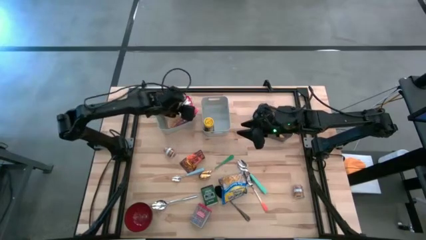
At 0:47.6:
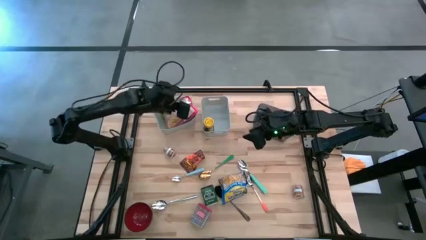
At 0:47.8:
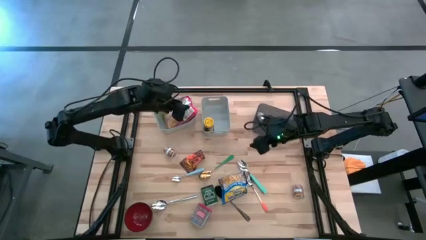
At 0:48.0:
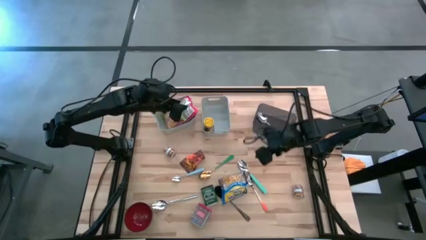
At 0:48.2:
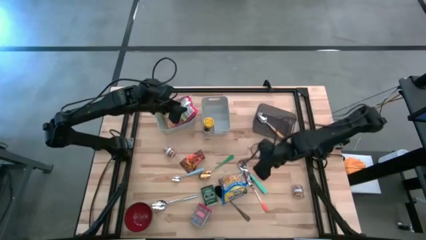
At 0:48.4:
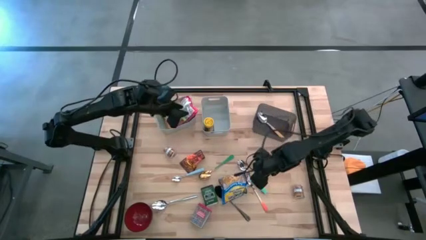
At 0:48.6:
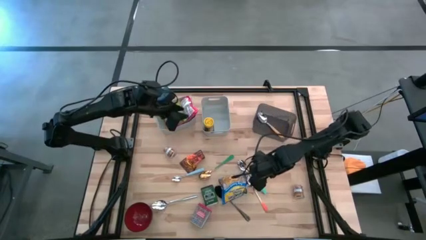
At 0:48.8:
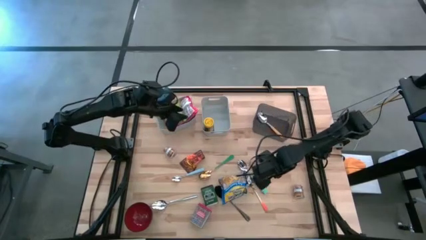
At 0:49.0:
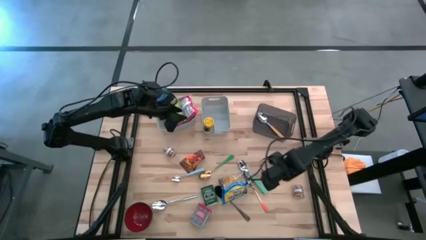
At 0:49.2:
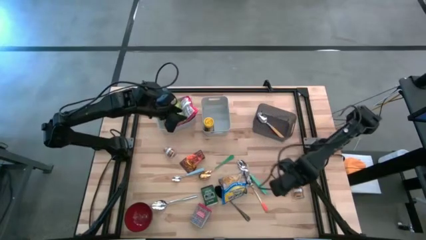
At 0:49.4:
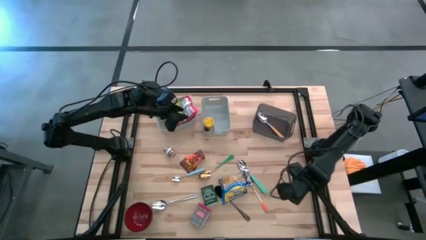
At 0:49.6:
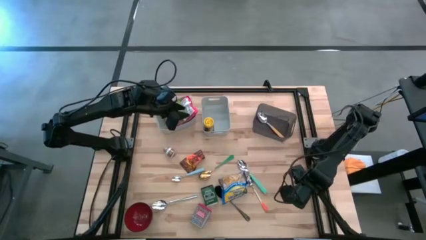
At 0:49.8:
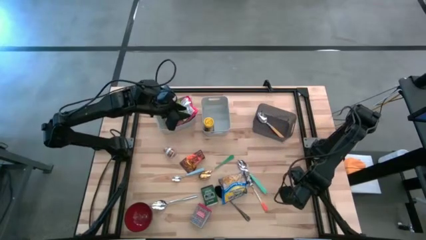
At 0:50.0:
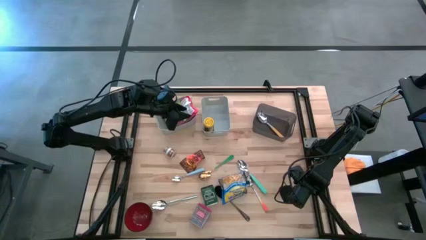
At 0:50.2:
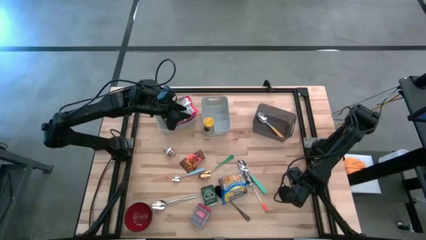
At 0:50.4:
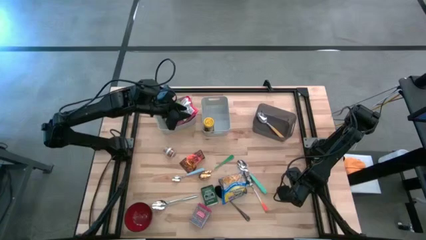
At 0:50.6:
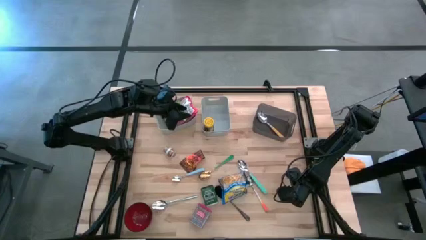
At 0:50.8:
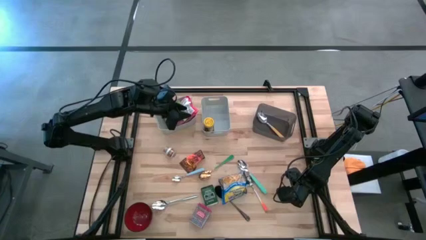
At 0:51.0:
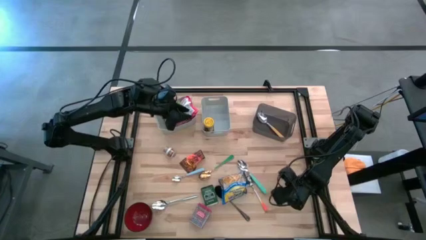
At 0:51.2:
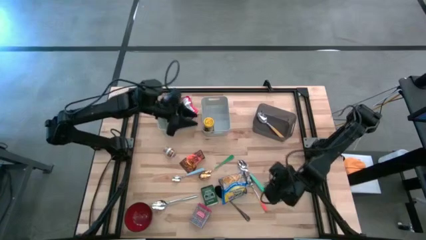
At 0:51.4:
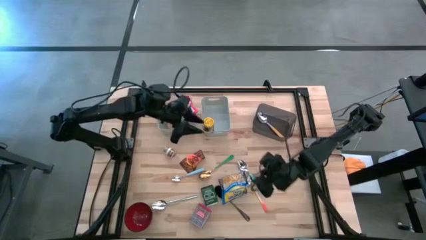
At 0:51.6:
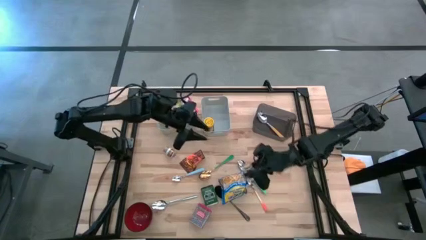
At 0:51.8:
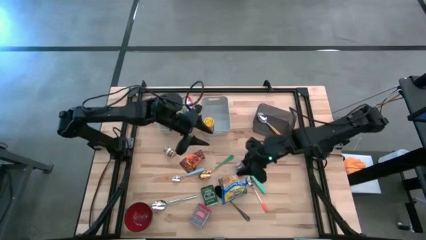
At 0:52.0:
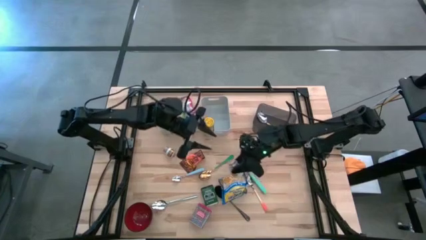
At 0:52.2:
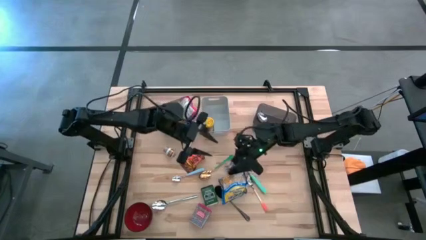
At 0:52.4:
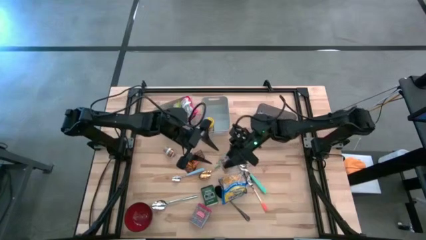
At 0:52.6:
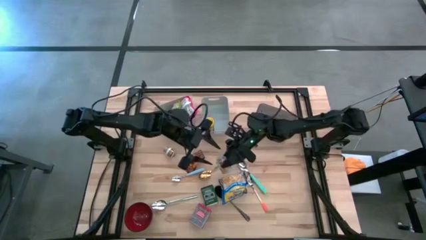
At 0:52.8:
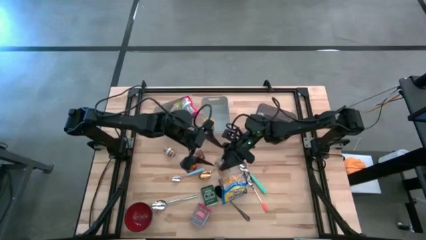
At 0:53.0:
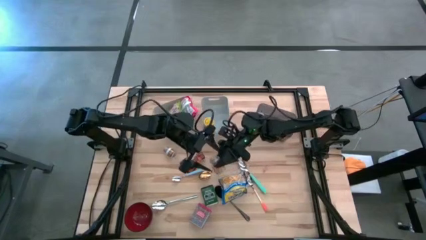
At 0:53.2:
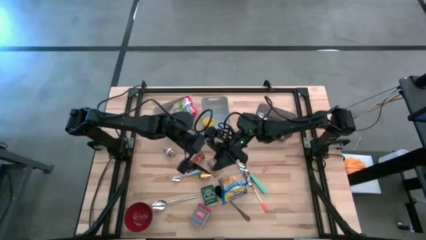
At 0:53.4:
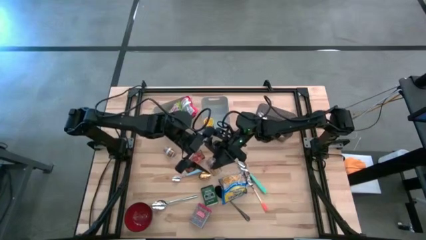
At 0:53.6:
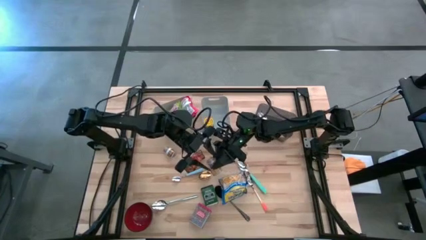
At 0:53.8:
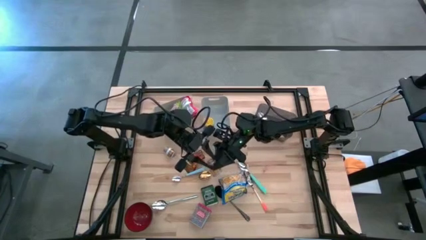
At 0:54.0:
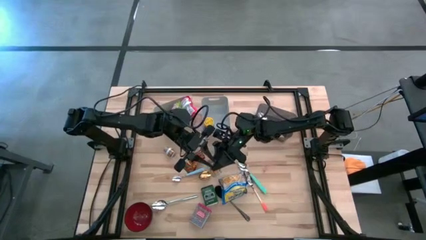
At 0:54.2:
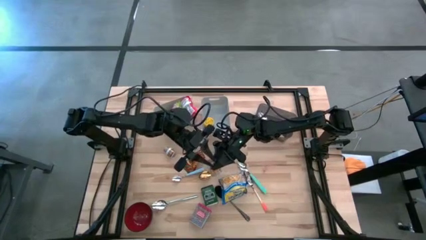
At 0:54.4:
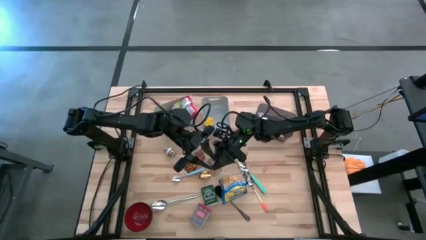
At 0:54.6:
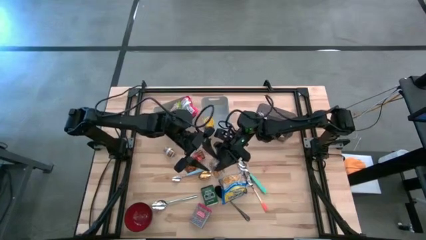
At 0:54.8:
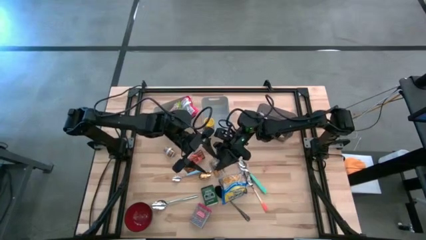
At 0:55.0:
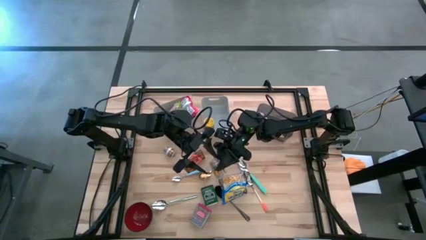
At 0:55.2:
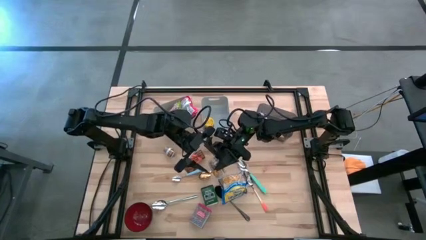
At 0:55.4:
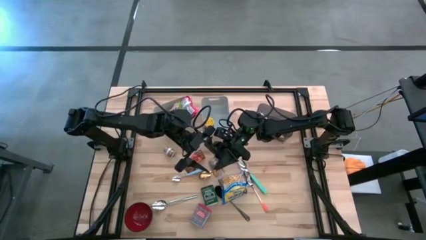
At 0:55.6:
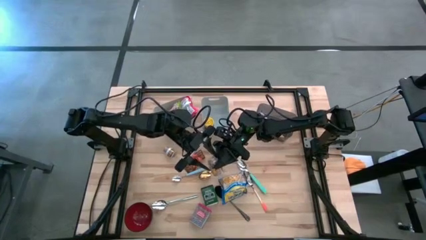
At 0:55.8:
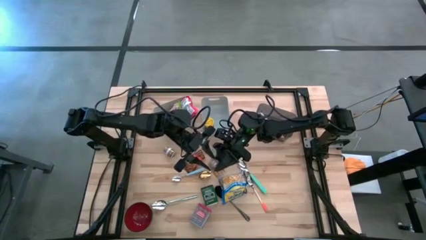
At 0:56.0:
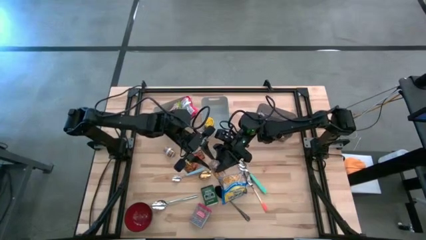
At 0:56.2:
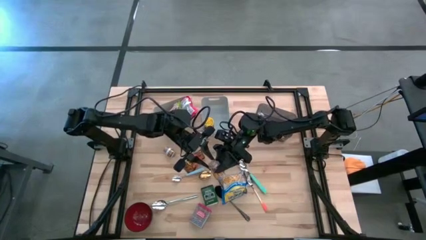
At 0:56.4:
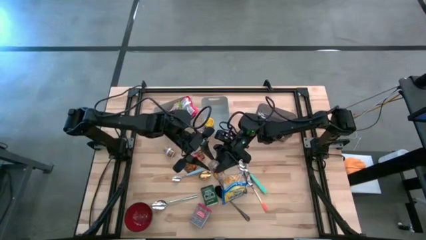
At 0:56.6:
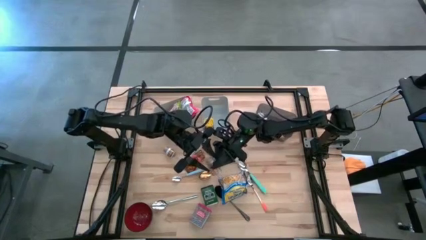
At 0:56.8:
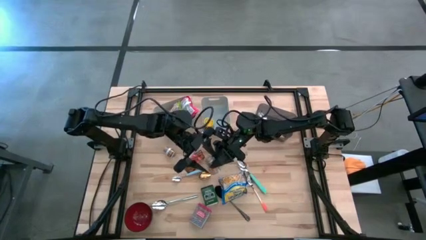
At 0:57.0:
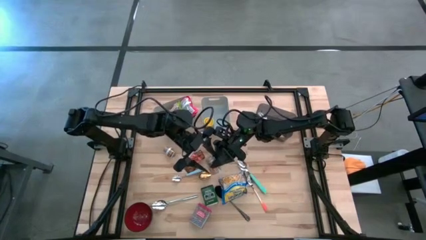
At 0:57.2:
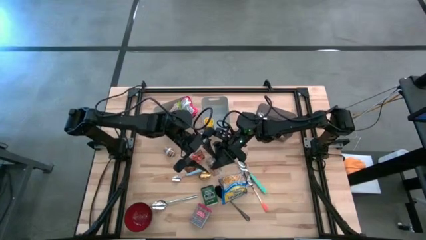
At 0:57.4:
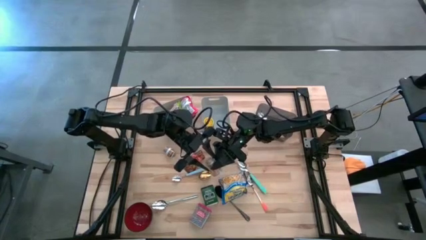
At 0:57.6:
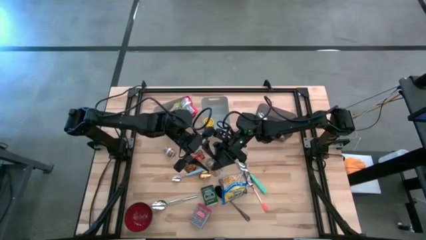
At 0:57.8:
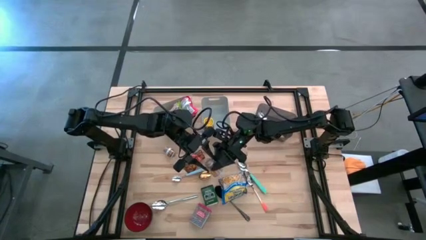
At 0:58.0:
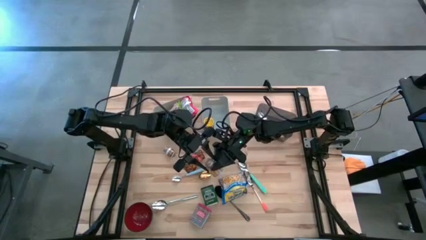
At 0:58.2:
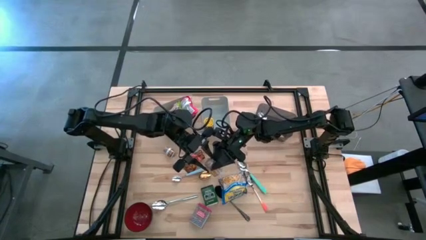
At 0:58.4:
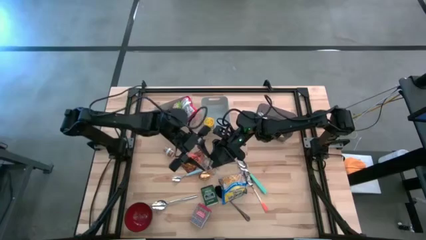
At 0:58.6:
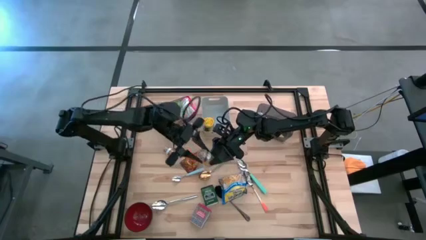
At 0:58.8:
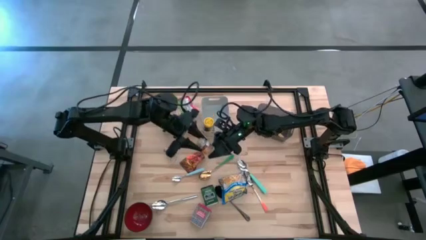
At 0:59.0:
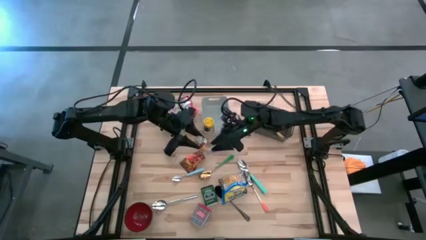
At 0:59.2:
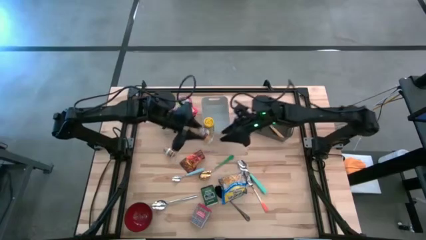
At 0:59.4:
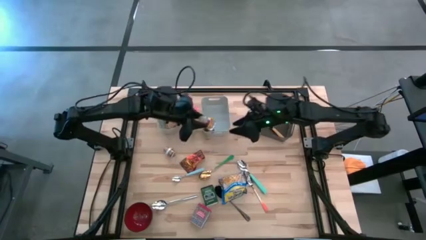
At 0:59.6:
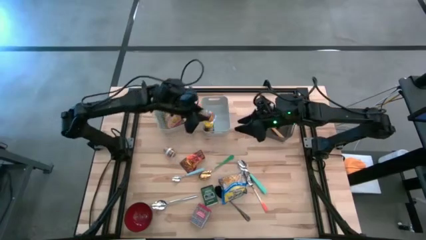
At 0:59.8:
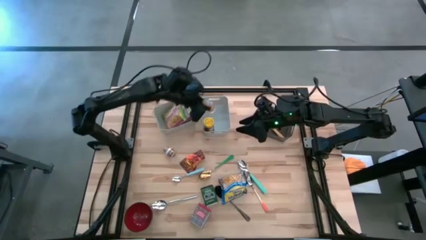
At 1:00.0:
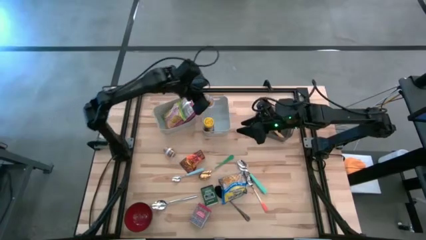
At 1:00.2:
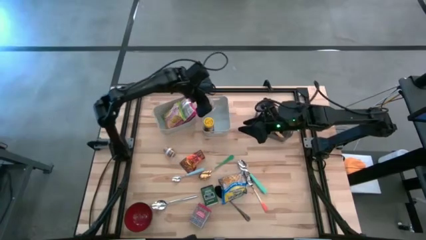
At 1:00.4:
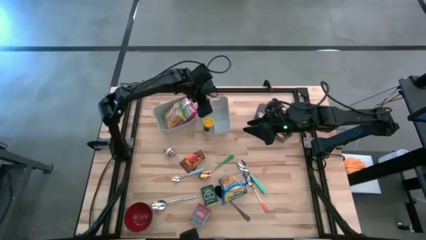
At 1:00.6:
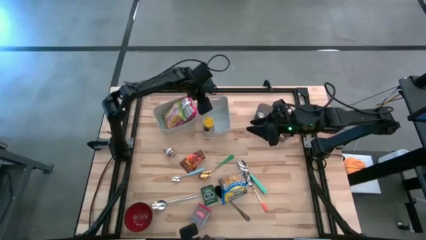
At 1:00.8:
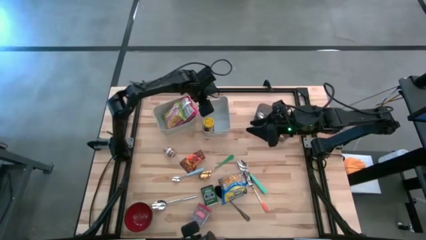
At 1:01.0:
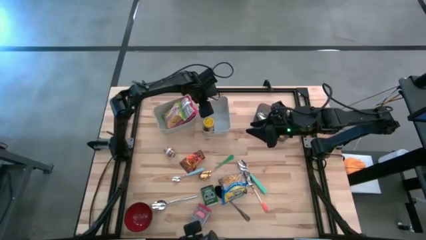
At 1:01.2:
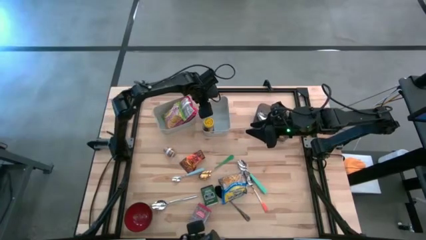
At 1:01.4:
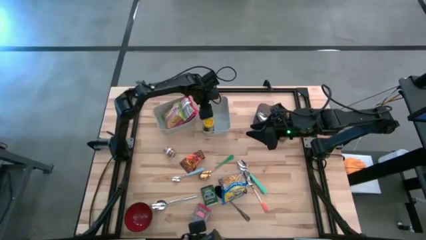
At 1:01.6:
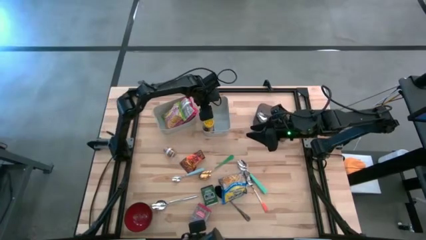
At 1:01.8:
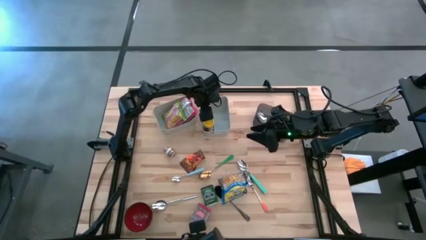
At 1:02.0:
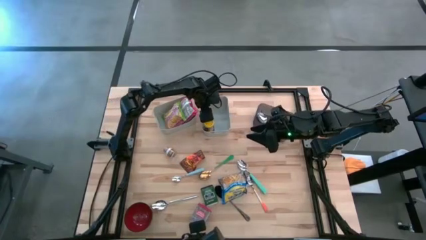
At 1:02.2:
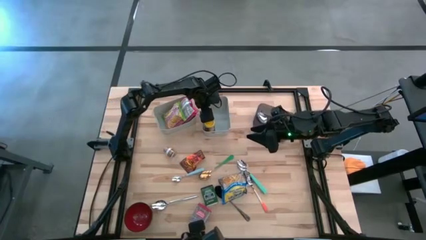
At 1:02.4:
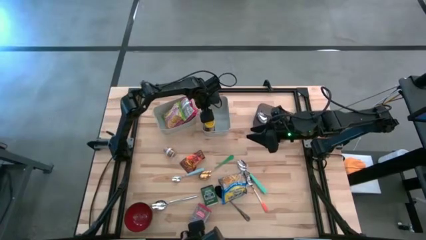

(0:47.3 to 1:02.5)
Put the right brown seasoning bottle into the right gray bin
